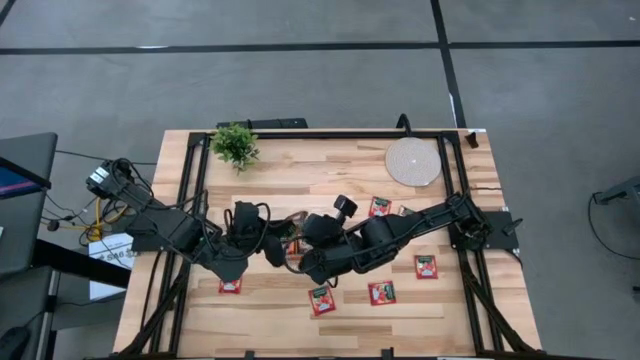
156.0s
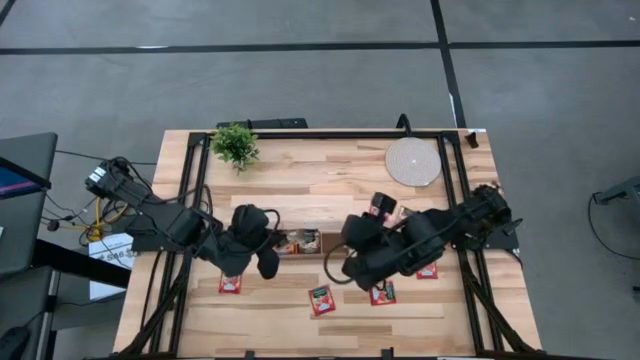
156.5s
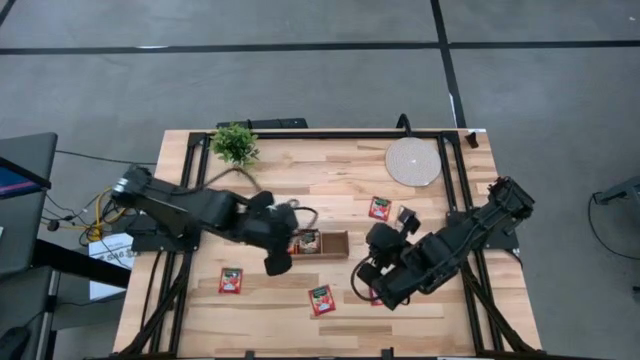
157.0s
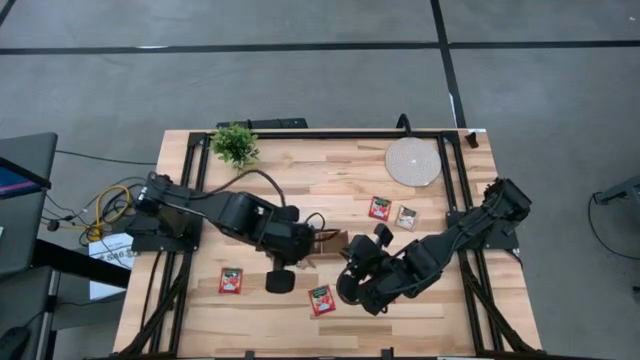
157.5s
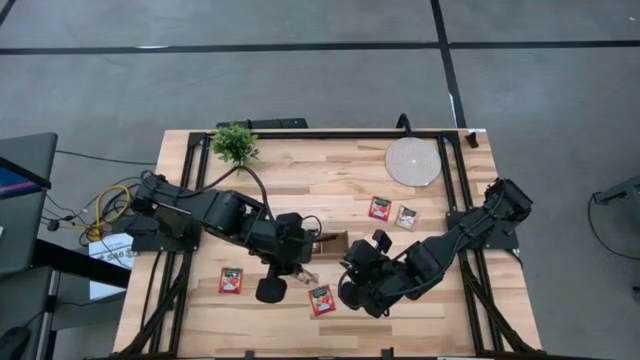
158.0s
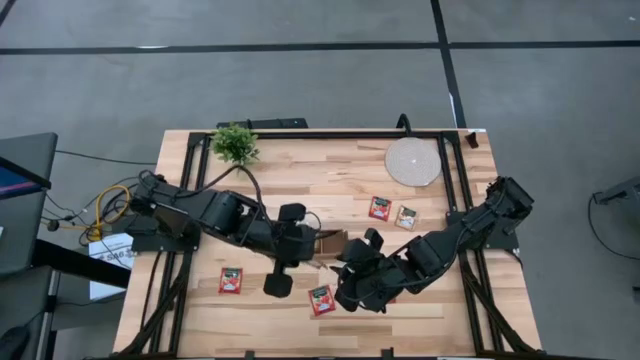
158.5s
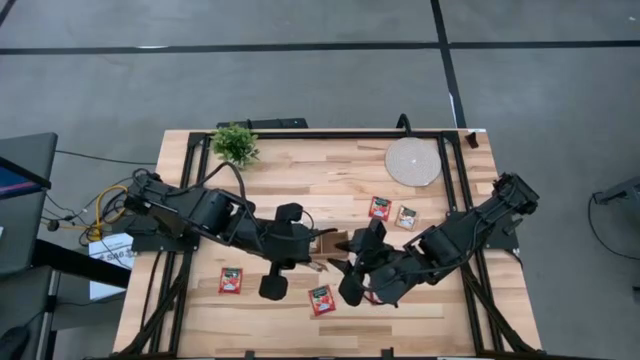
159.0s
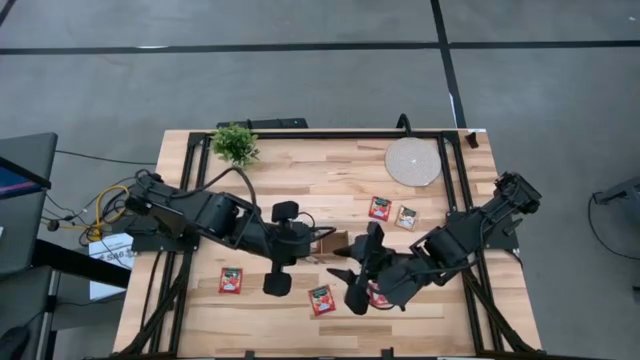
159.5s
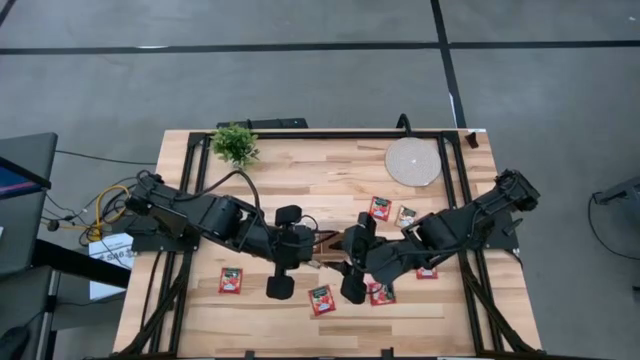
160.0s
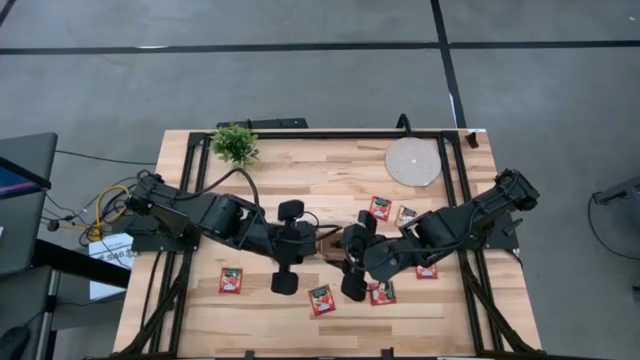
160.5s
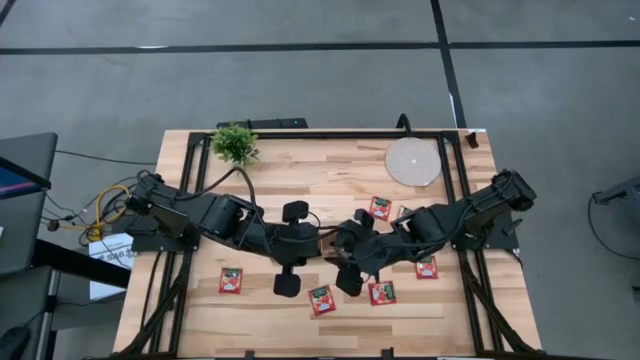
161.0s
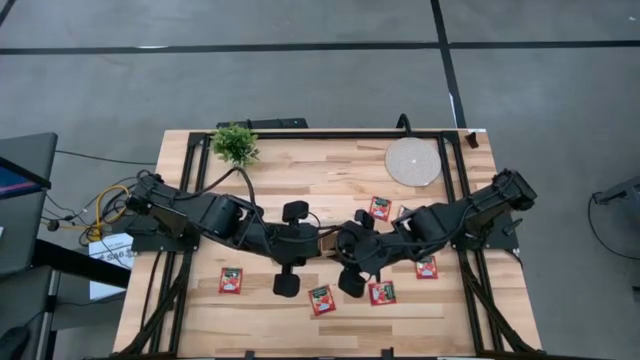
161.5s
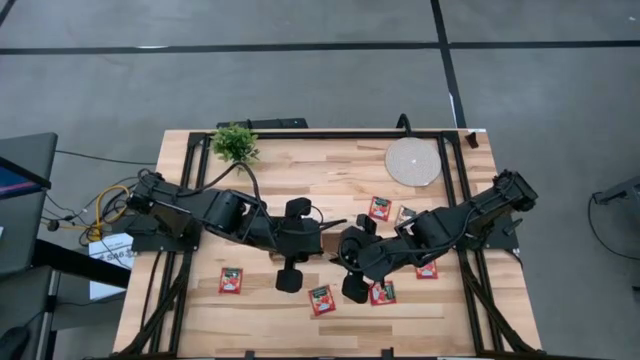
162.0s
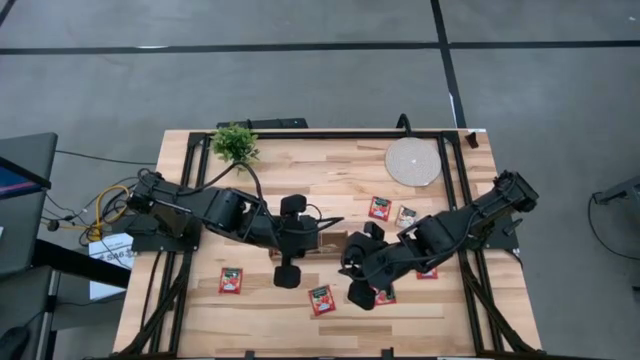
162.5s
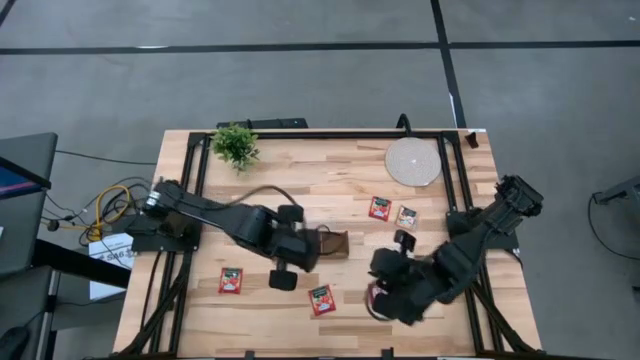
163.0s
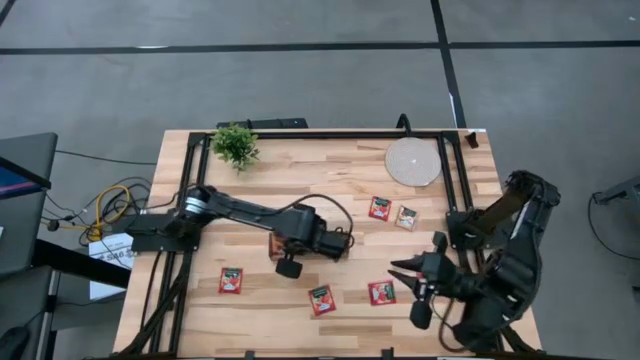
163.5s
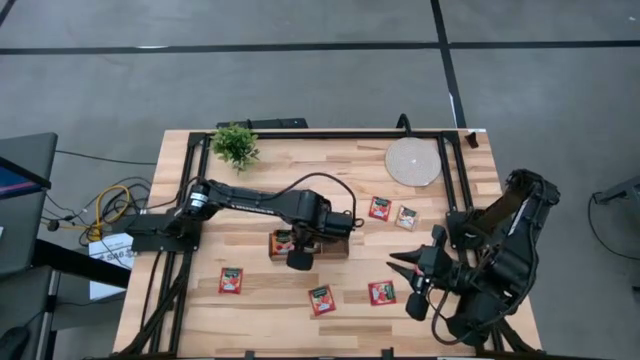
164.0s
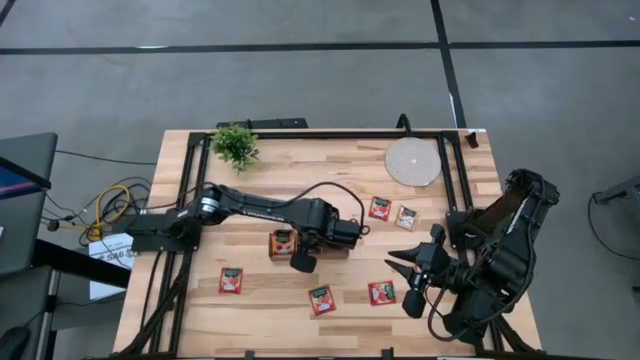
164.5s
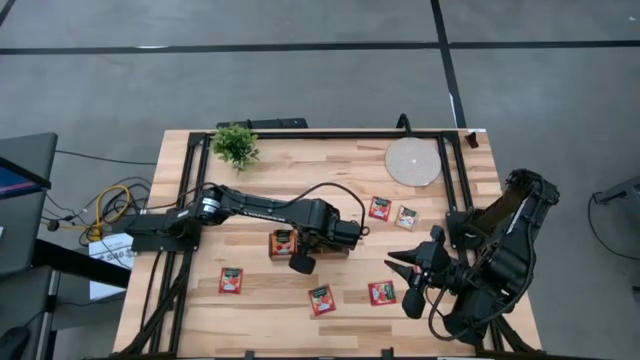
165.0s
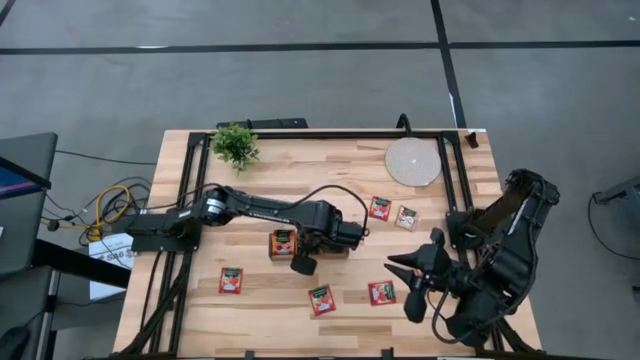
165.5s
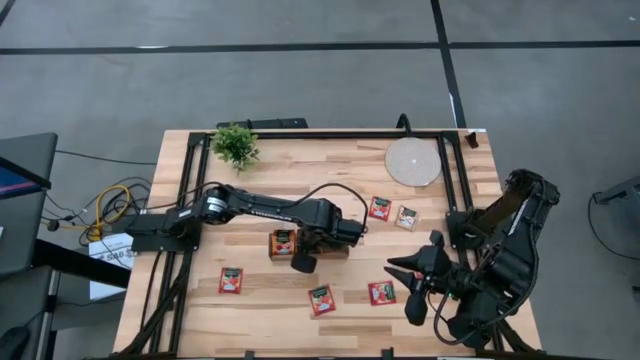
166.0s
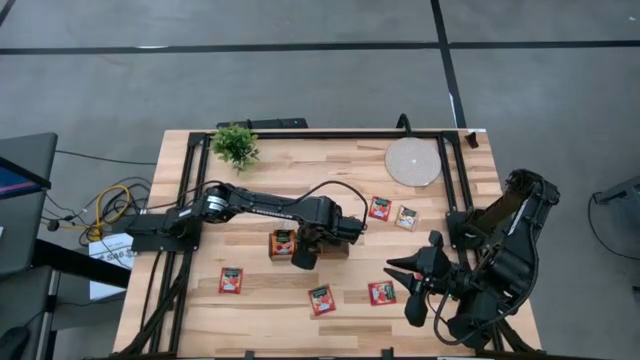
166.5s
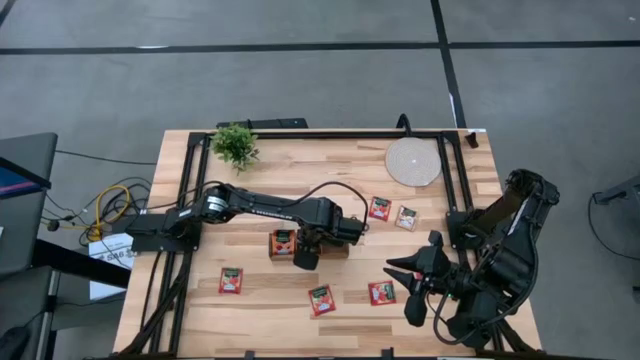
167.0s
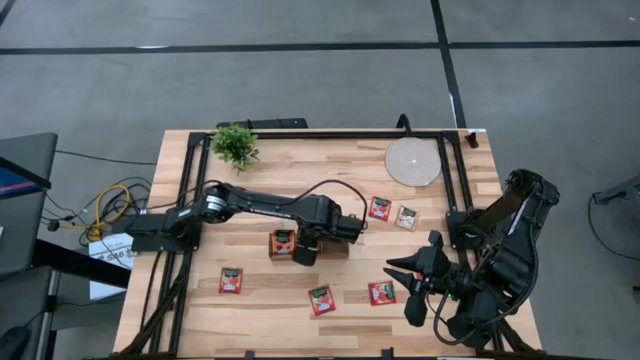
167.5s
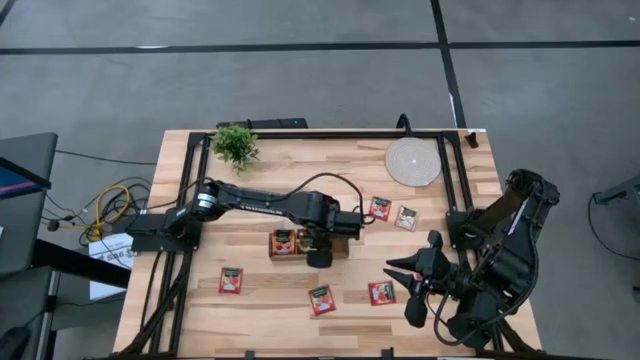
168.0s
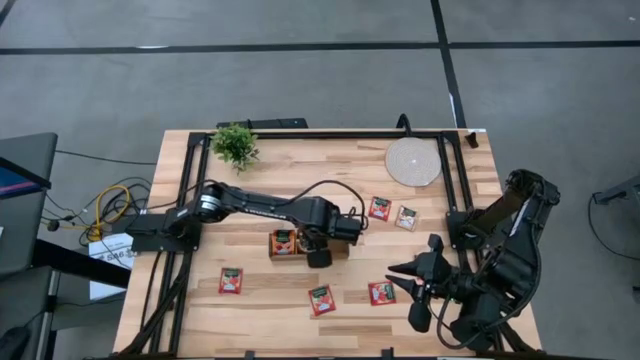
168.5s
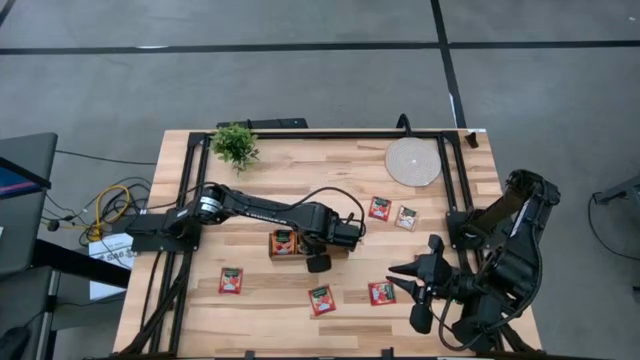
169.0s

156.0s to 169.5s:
Task: Pick & Place Tea
Put the brown tea bag into the middle section of the wooden organizer

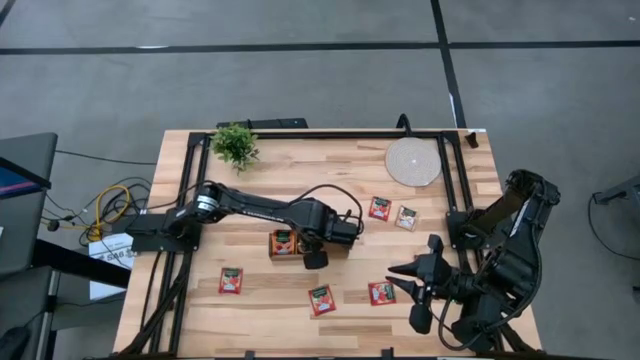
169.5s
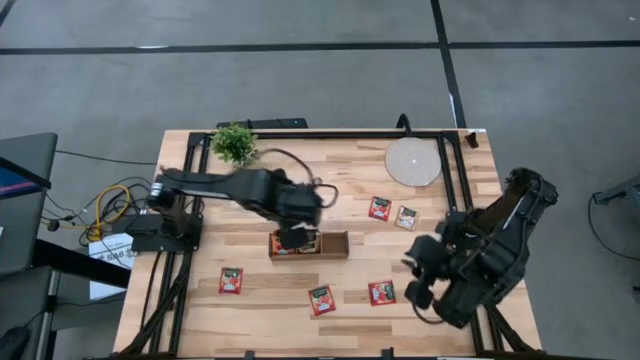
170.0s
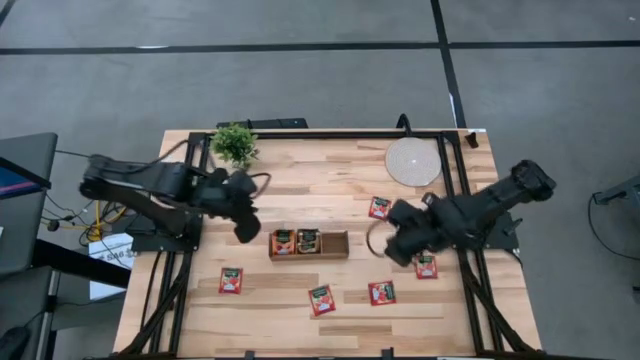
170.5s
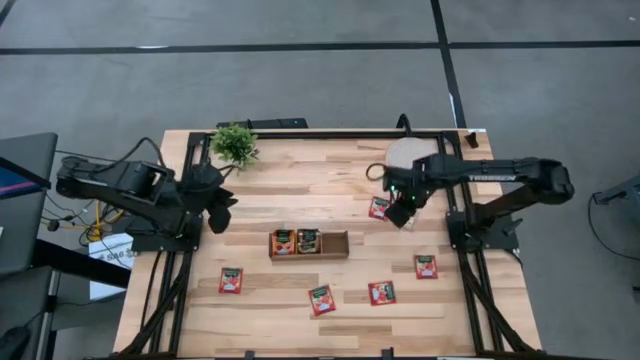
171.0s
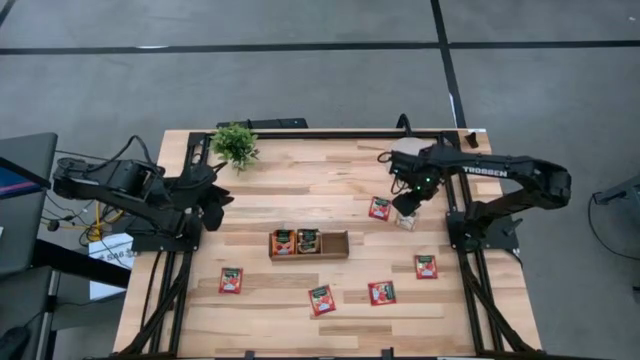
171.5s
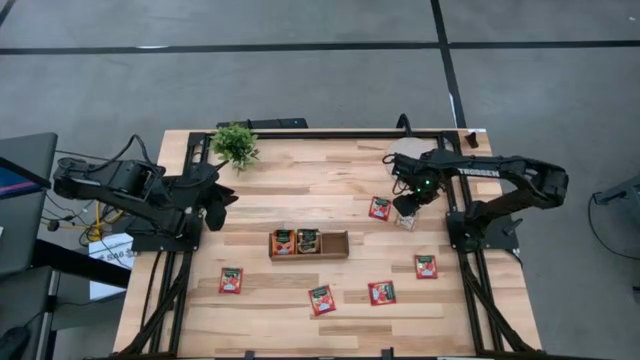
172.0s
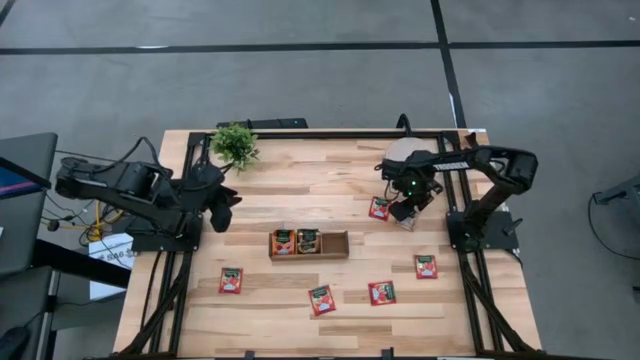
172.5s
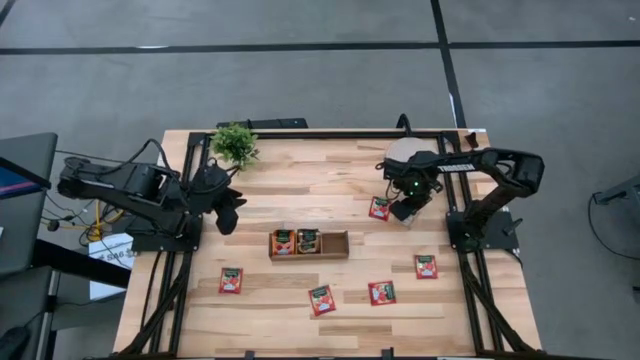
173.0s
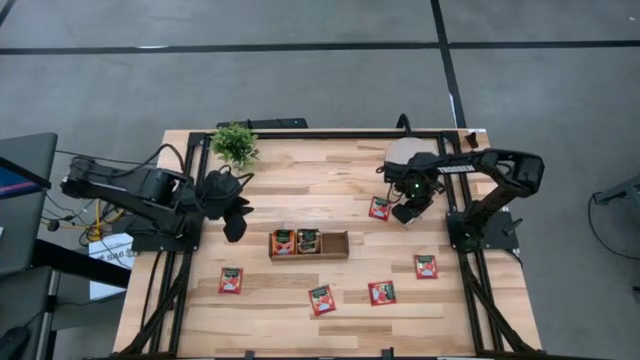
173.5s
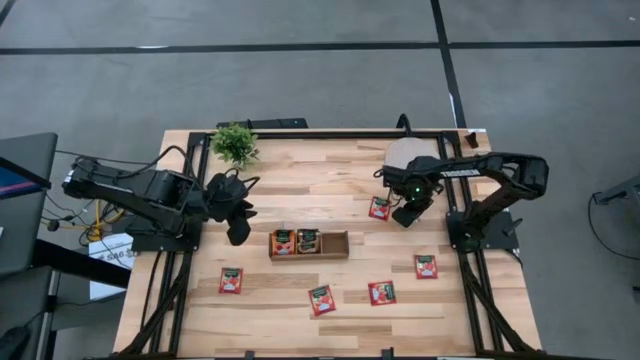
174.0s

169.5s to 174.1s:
Put the brown tea bag into the middle section of the wooden organizer

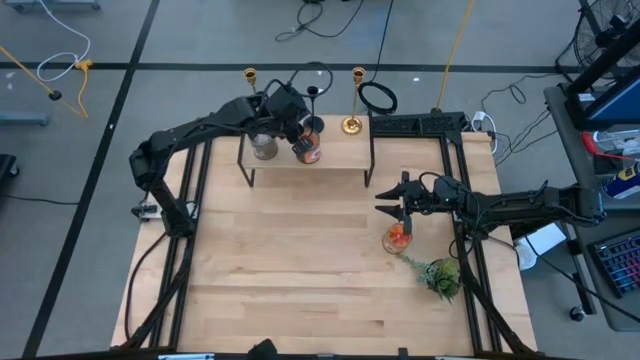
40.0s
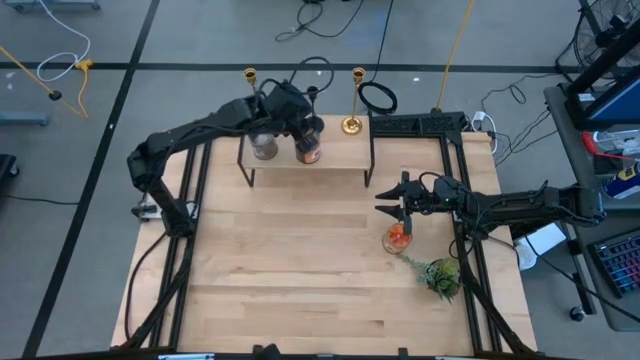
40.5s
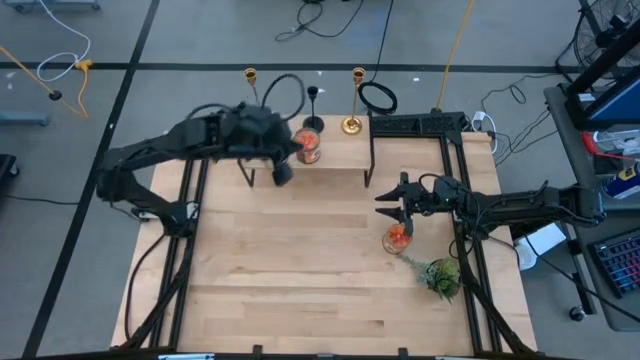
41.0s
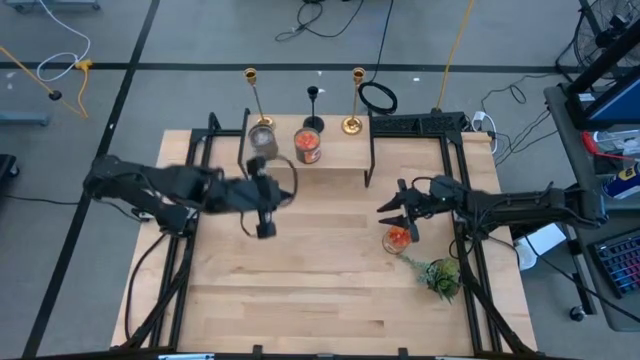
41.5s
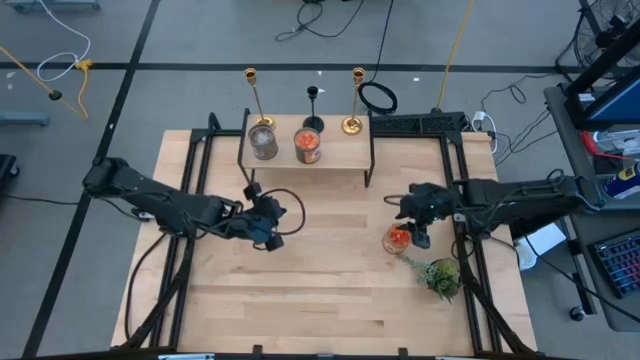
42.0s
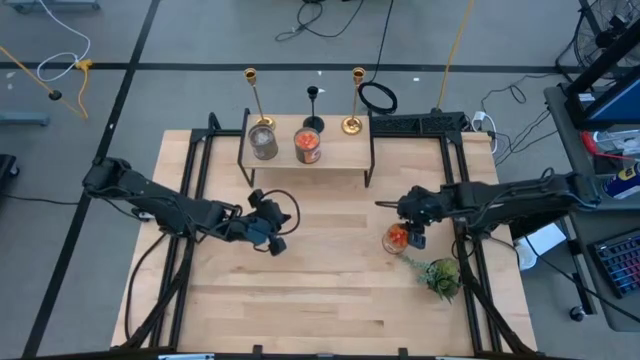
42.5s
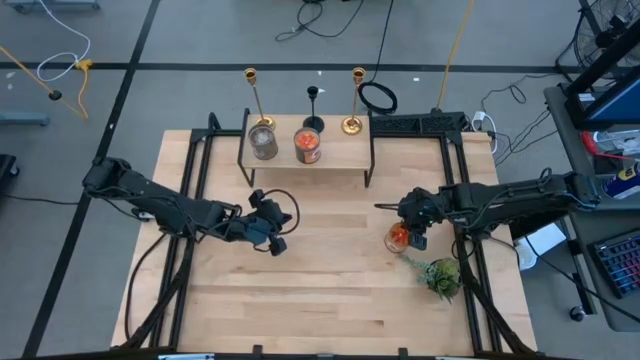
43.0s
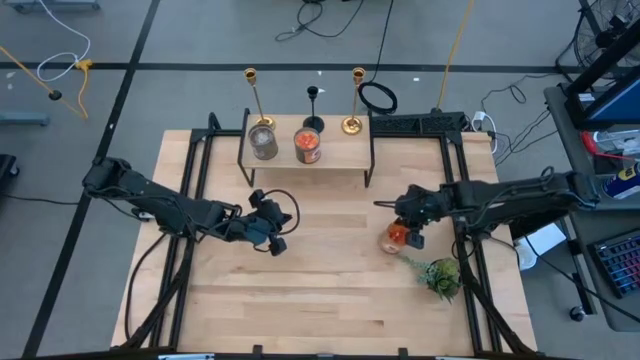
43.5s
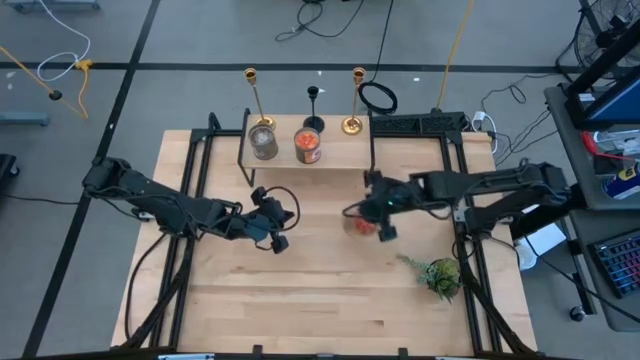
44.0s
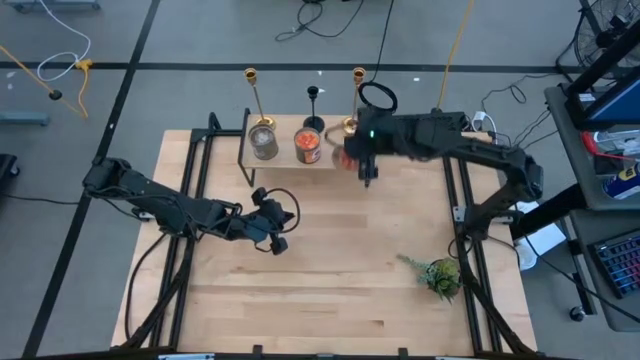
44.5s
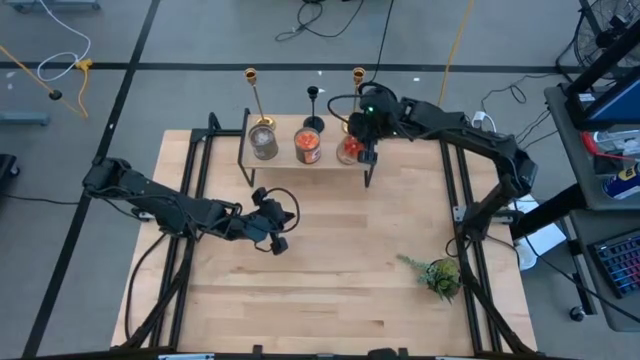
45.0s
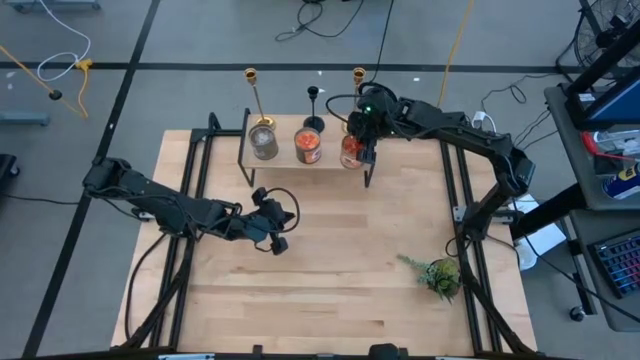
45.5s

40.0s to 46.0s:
Task: Pick & Place candle stick holders
Put the orange candle on the shelf
